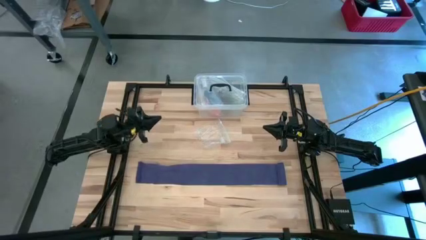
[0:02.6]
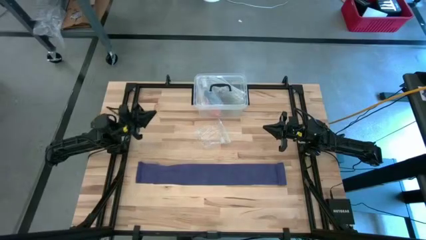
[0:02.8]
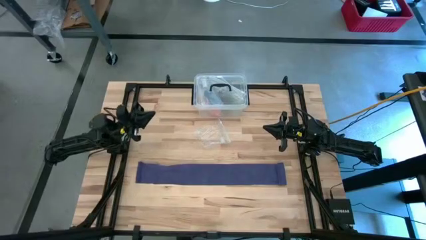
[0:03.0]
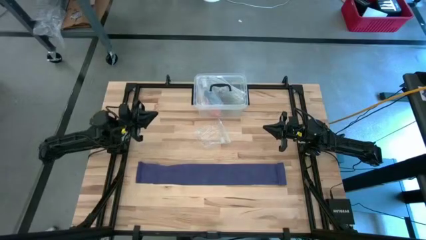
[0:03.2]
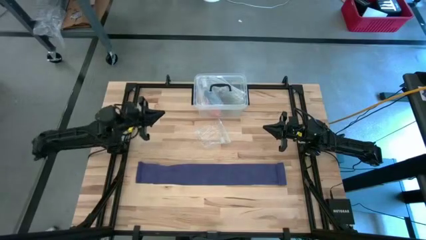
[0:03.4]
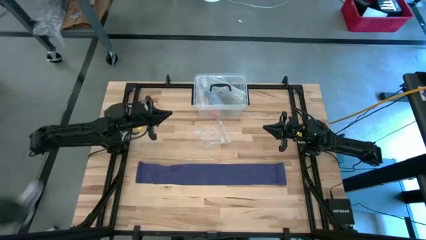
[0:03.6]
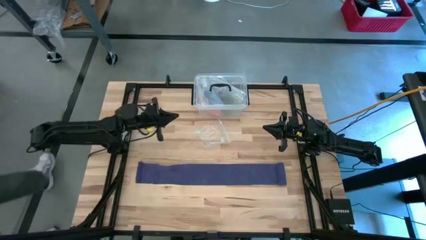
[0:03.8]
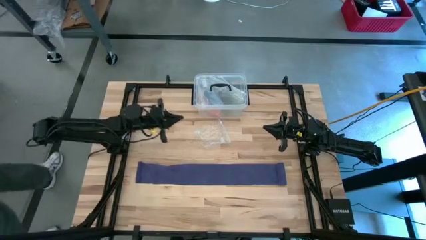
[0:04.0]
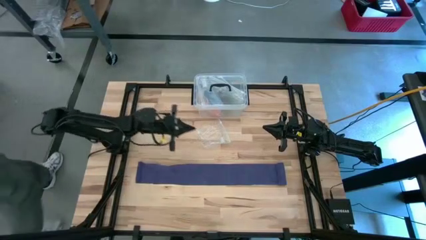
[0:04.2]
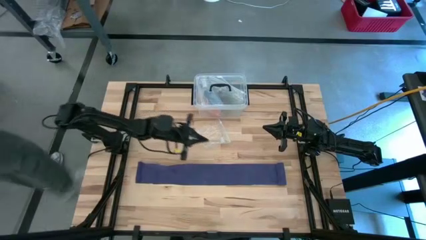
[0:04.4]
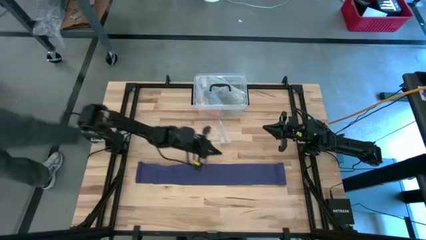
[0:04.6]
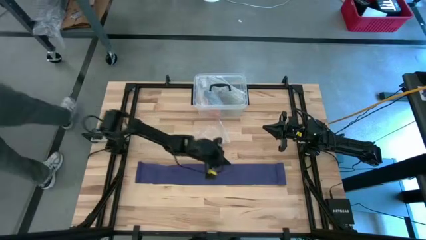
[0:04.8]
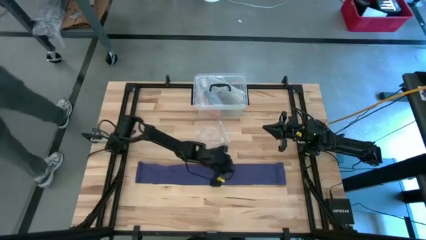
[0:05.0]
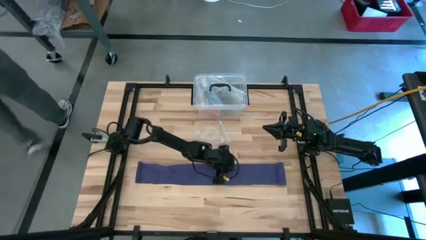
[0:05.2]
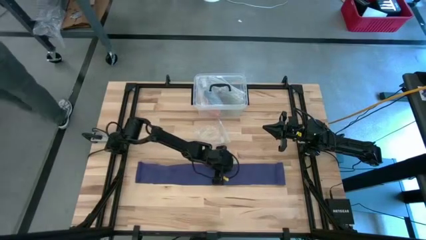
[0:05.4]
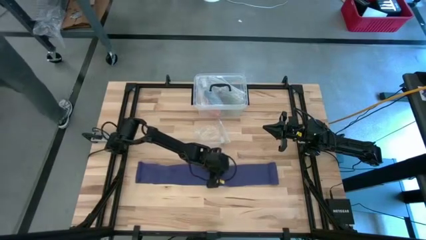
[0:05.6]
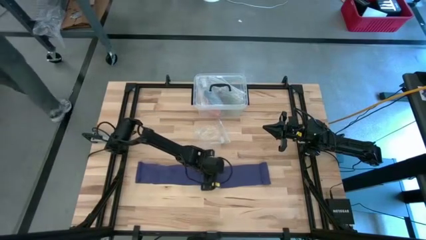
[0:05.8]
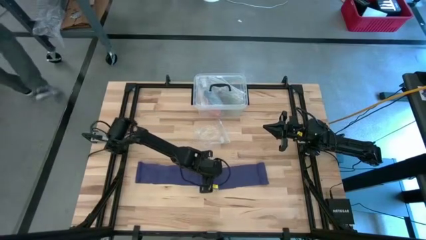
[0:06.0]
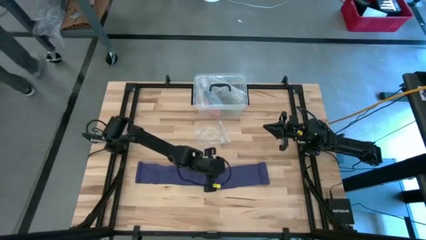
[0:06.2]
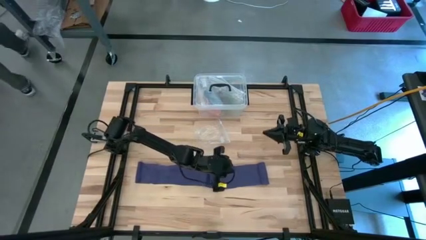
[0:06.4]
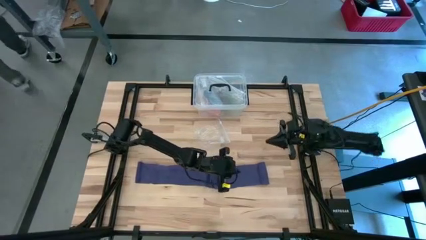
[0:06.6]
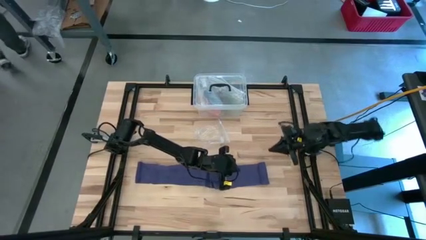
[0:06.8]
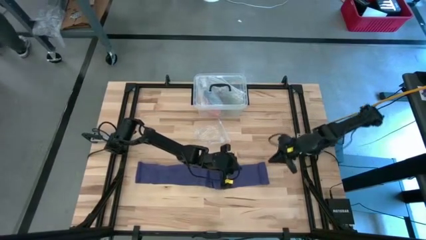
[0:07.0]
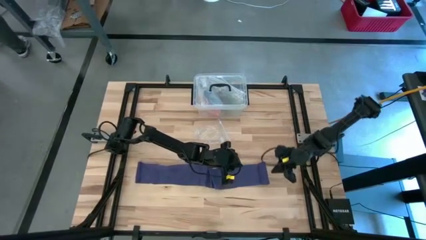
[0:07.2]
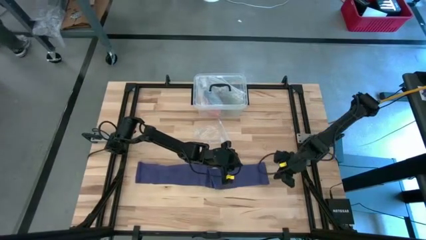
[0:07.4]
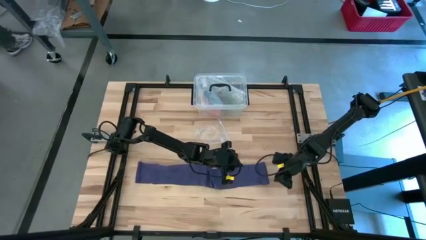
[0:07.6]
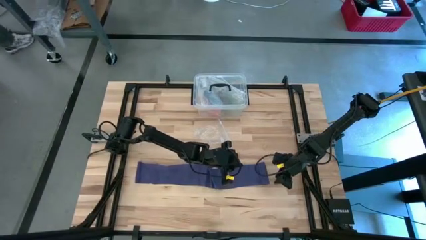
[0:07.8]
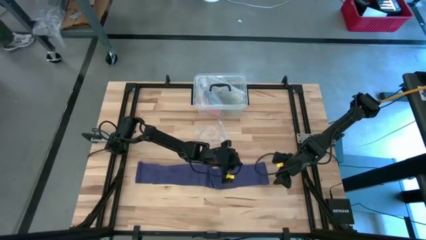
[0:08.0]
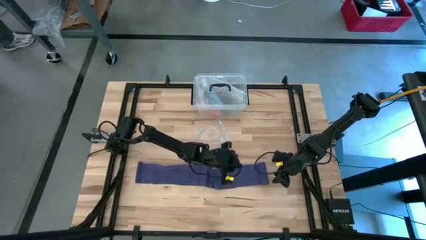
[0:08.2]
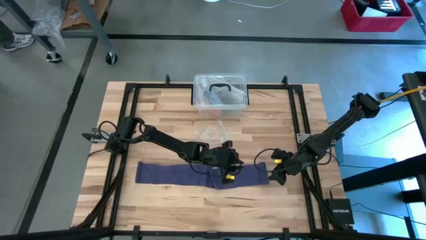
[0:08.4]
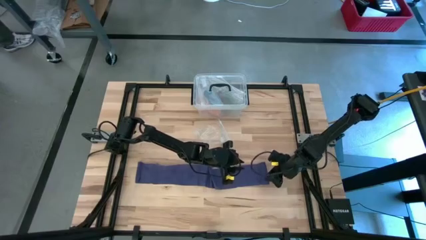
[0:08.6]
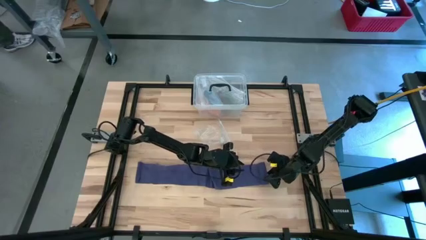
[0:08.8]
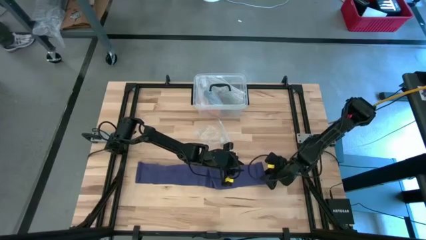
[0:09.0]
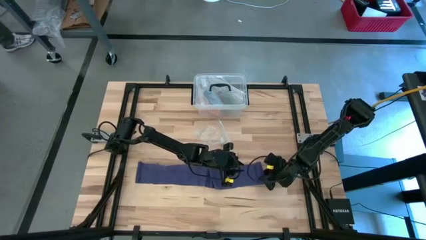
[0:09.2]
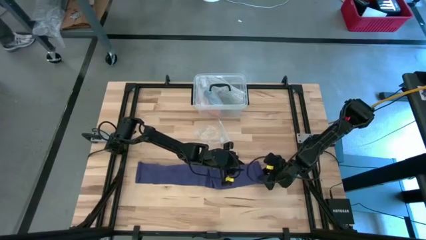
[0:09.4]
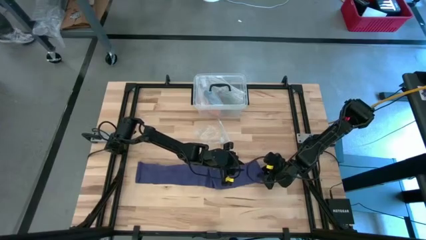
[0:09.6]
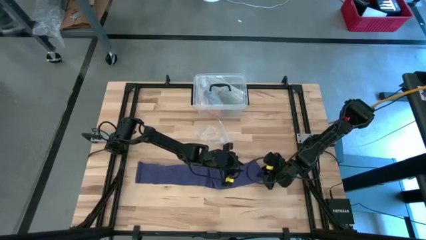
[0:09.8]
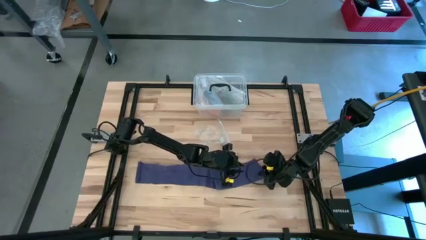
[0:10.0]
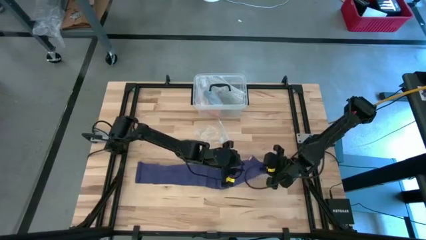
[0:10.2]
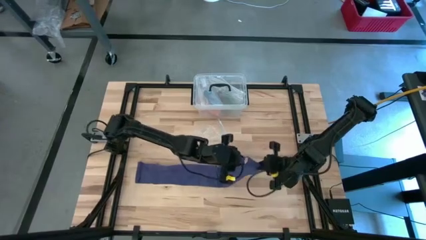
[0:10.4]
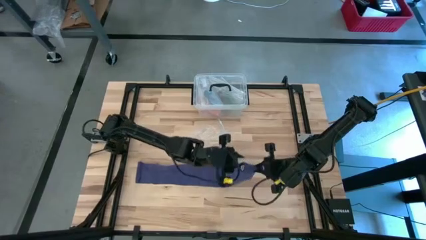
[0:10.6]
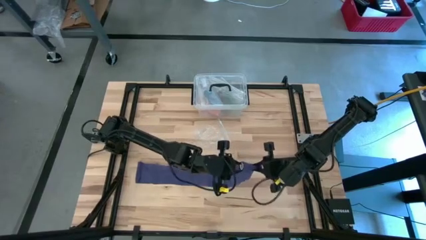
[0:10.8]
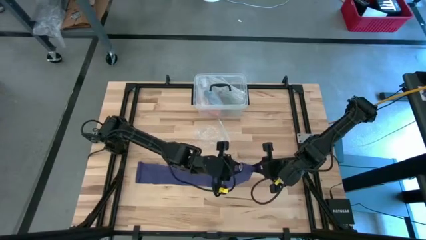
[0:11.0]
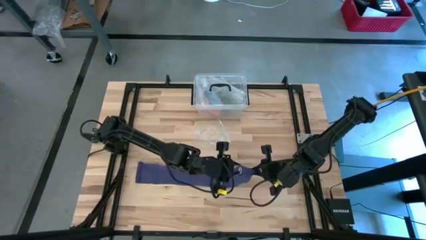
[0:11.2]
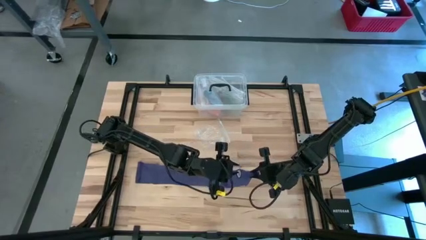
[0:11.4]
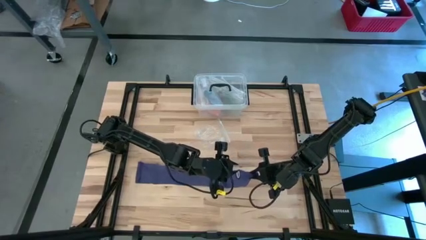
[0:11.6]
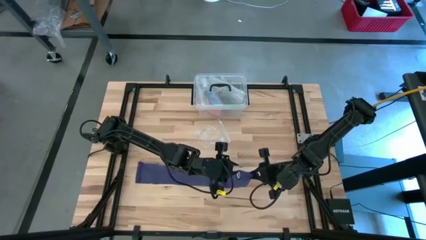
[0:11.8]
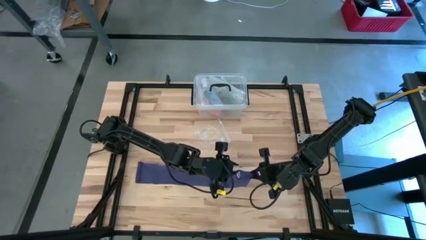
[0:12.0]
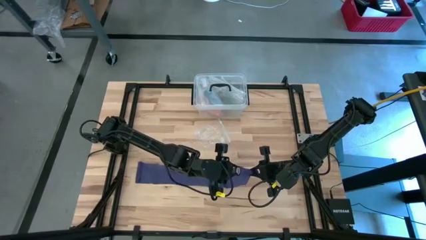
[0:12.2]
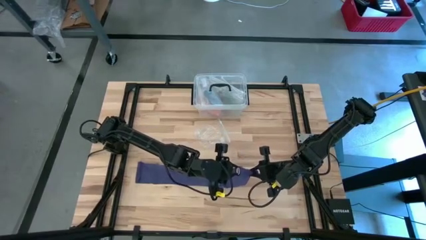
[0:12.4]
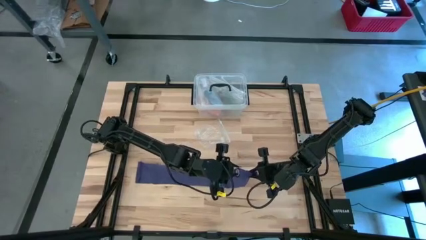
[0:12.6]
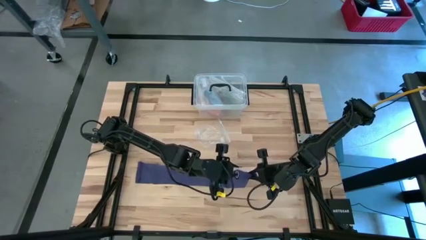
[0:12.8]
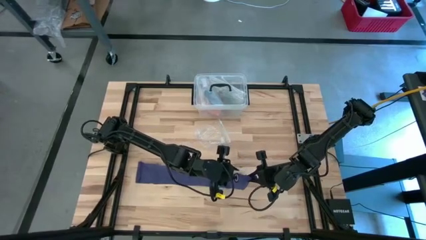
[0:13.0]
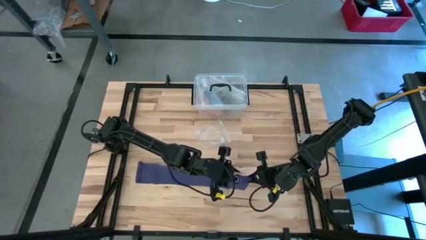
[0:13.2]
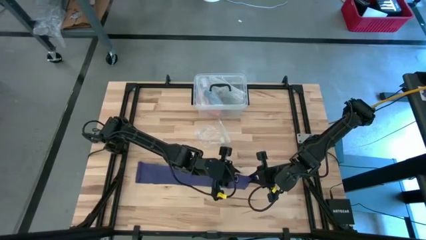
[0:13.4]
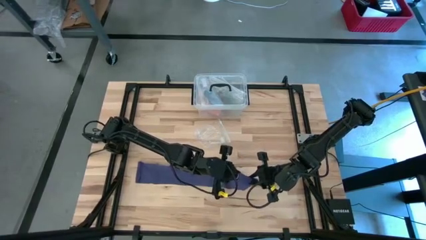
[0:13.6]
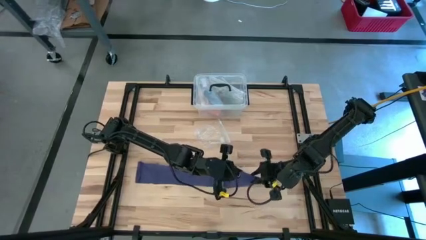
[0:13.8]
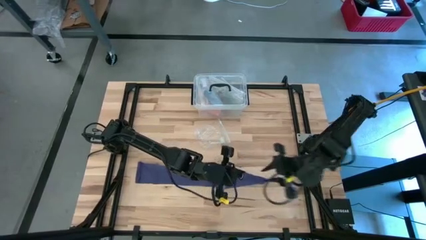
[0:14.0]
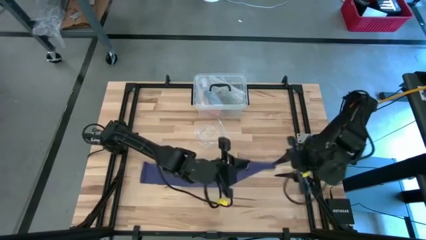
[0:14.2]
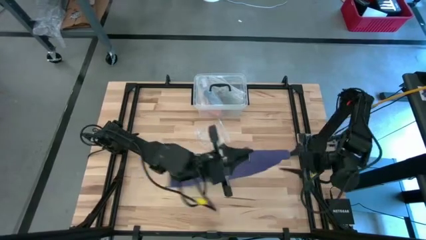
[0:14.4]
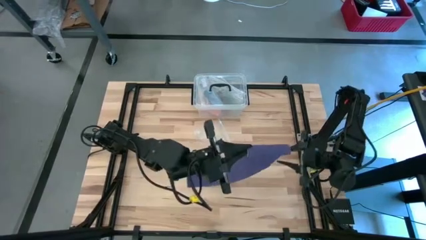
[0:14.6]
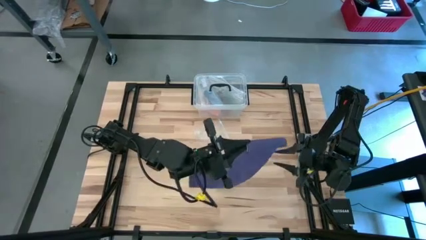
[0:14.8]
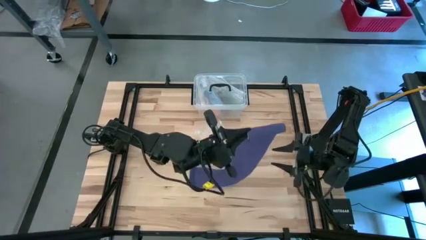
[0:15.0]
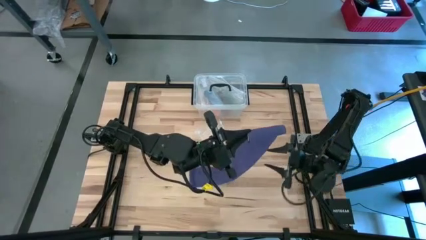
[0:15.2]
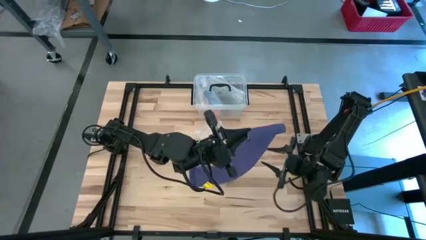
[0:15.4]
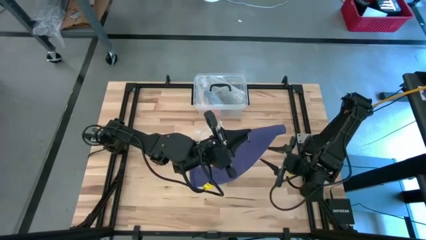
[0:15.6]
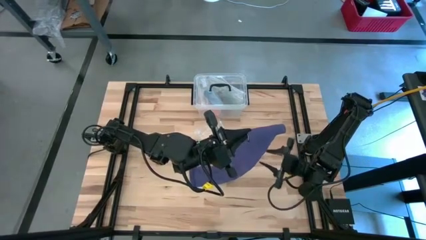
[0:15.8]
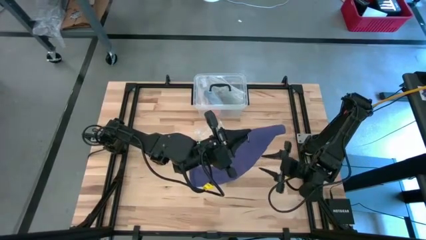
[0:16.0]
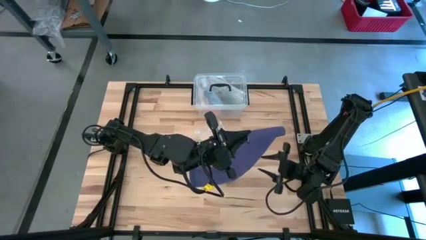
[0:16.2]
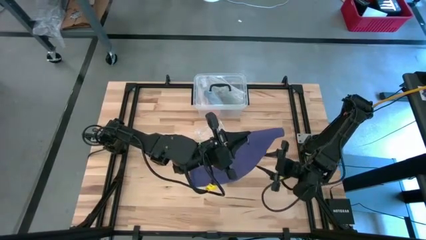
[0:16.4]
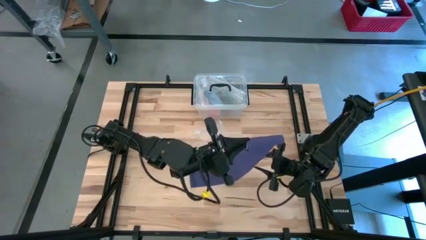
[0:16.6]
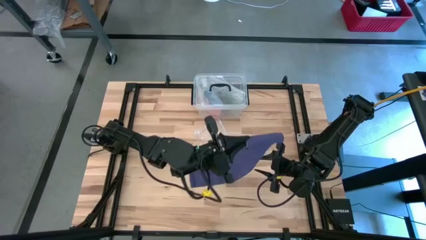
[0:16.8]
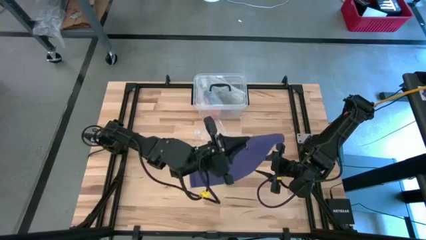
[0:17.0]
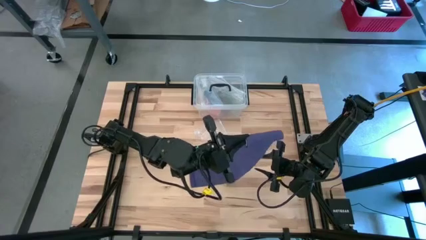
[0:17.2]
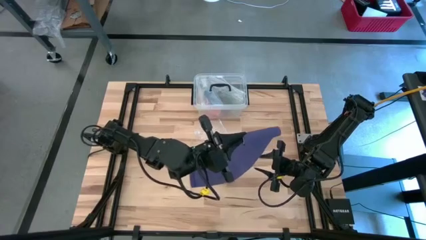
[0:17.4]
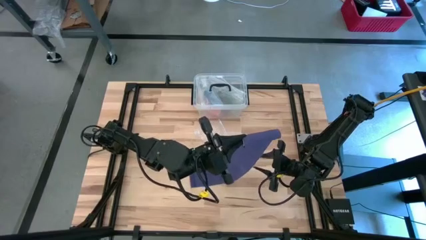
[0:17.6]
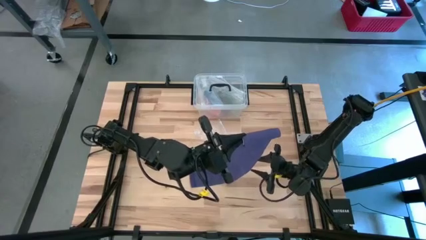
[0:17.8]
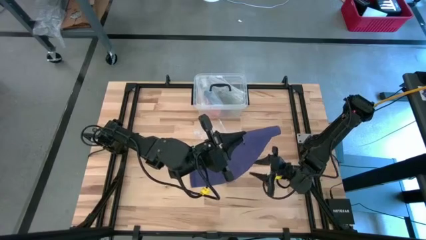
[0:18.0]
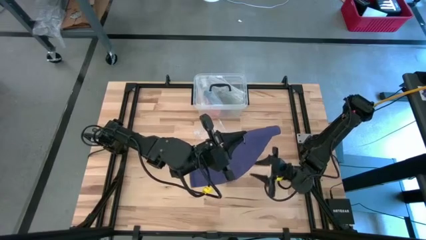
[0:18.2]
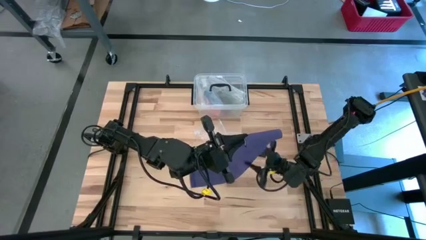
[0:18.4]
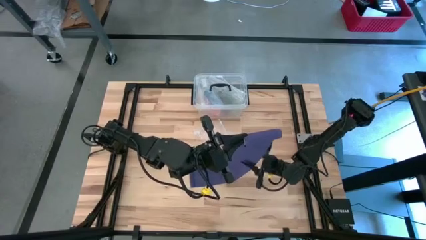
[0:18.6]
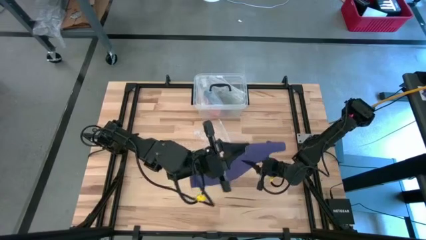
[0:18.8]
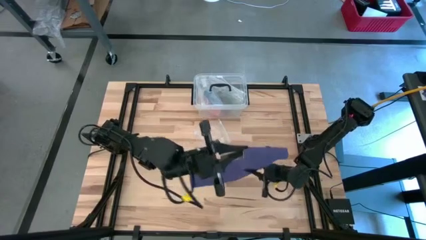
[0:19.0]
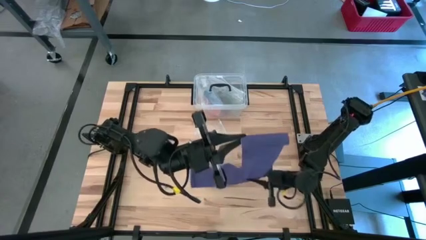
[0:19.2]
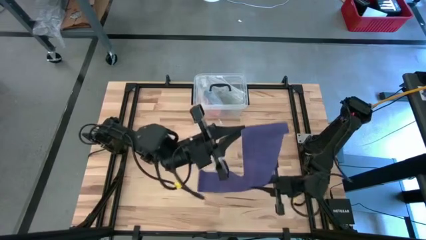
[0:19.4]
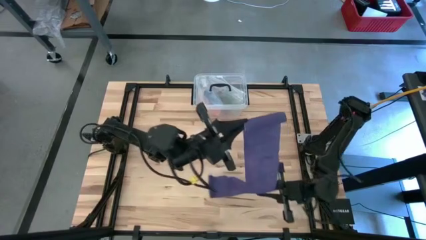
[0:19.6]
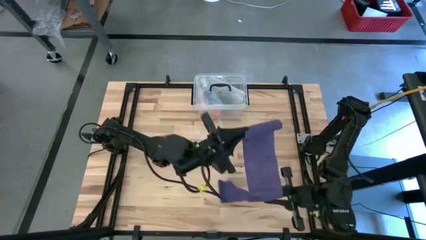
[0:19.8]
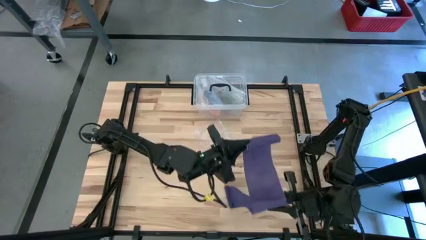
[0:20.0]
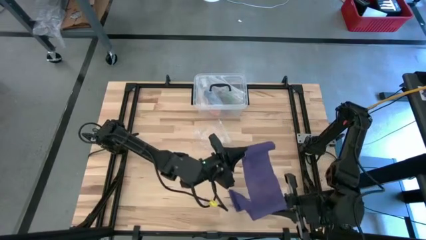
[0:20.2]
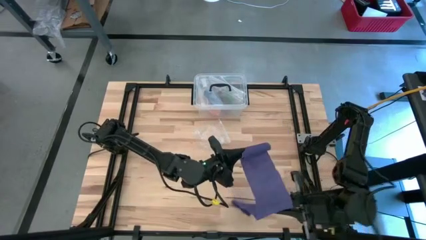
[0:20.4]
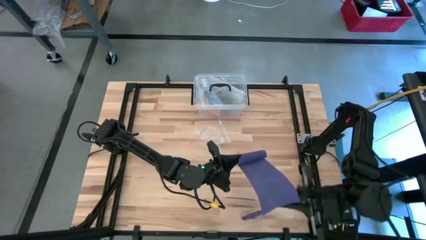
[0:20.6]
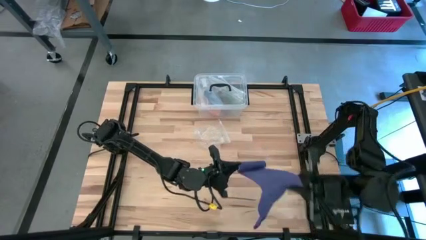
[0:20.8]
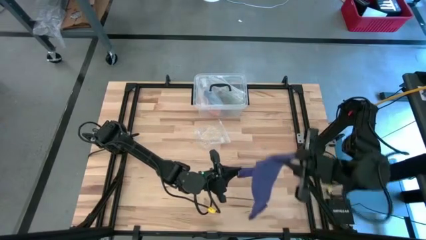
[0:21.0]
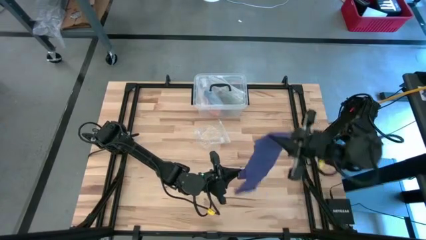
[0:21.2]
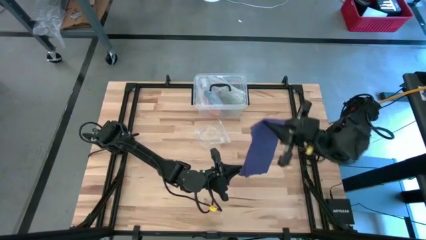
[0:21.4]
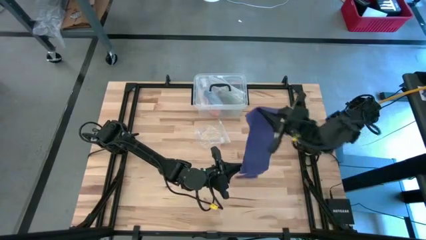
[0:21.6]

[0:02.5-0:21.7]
Task: Roll bandage
Roll the blue bandage
